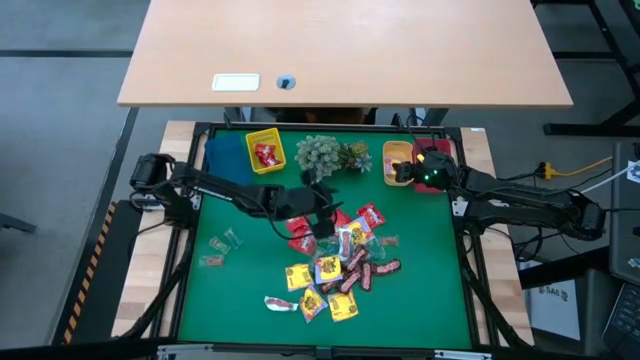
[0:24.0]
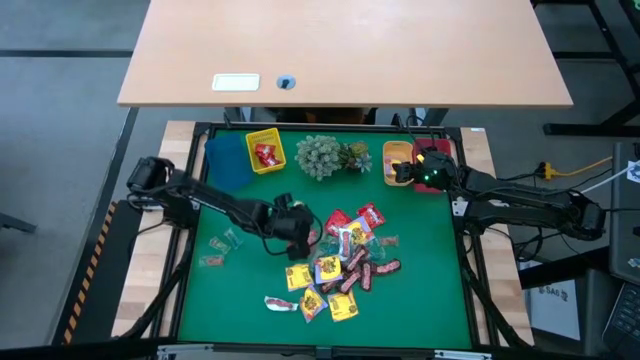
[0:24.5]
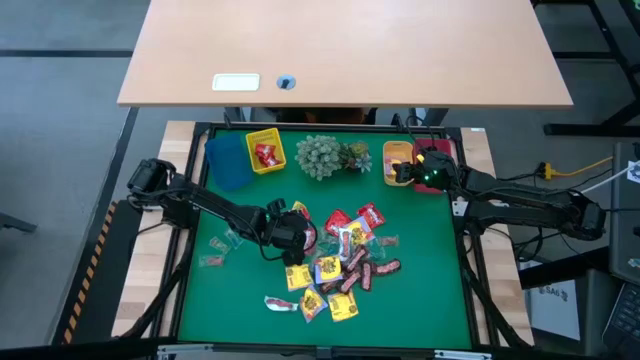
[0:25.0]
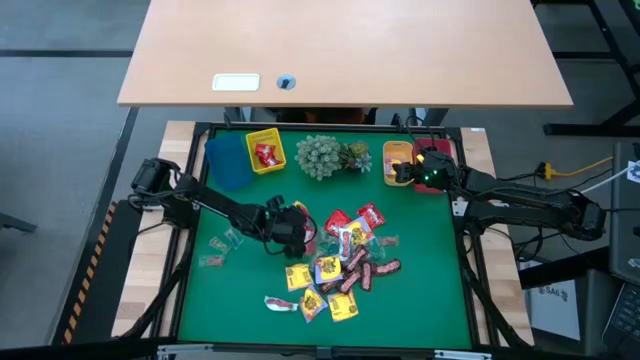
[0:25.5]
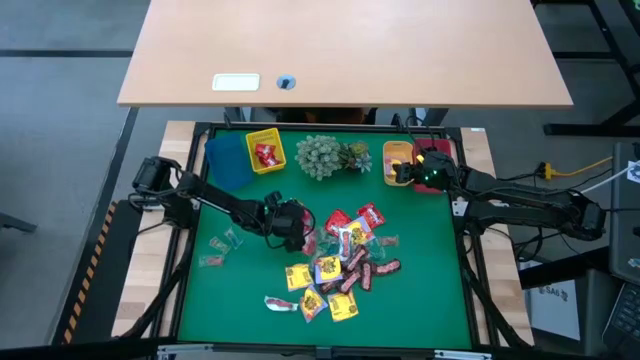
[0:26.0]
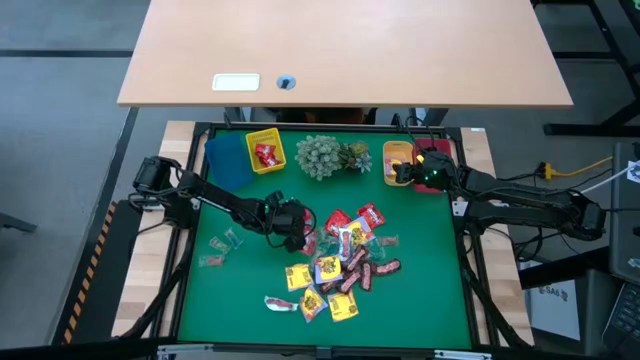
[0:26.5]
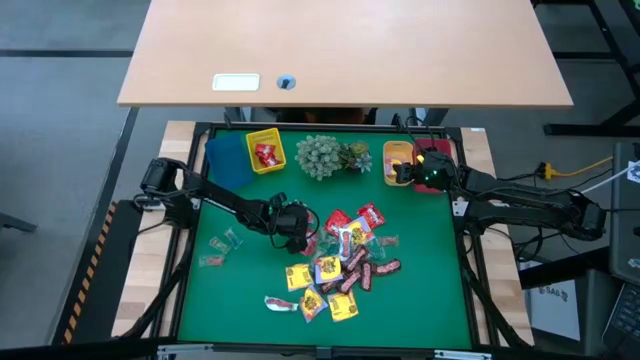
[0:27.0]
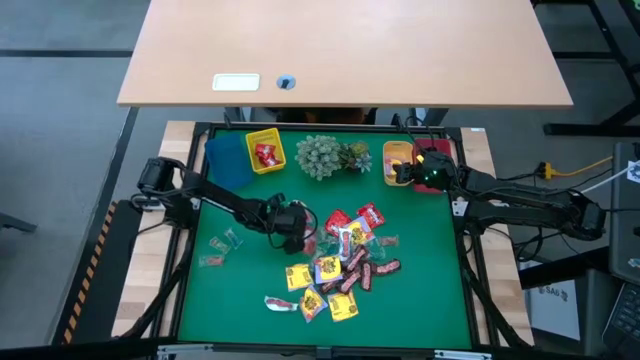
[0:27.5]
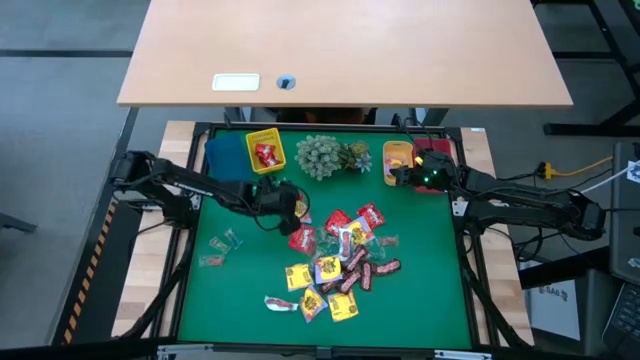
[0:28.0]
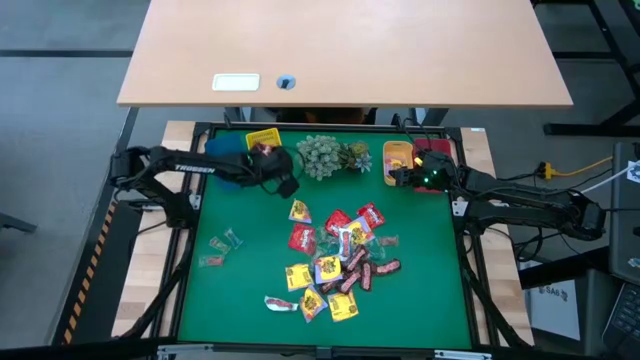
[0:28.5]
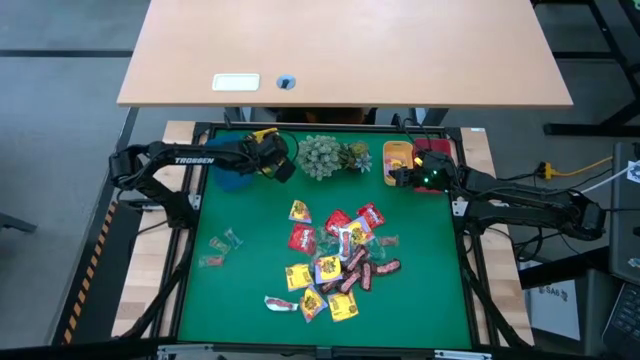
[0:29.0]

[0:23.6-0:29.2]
Task: Sort candy
Put the red candy into the yellow bin

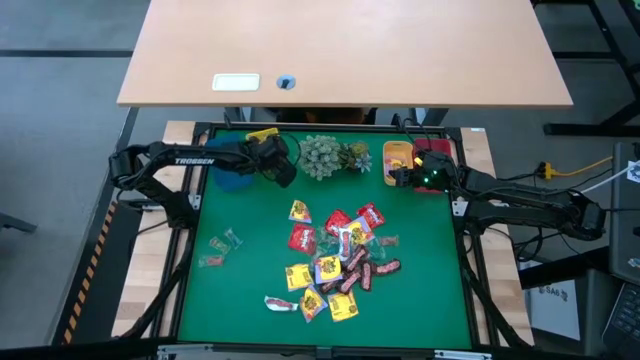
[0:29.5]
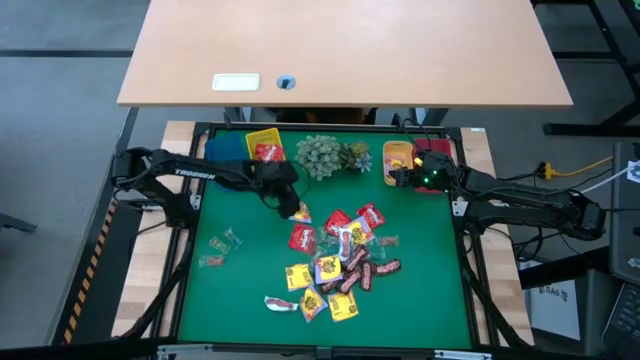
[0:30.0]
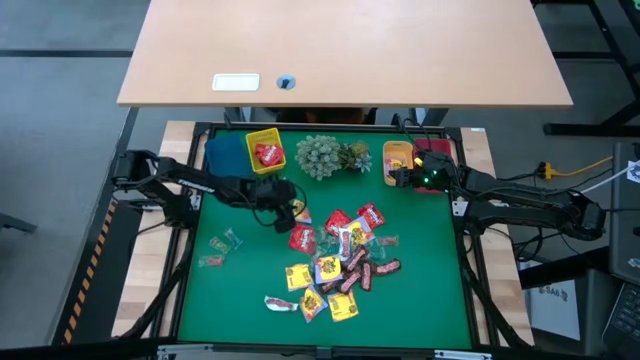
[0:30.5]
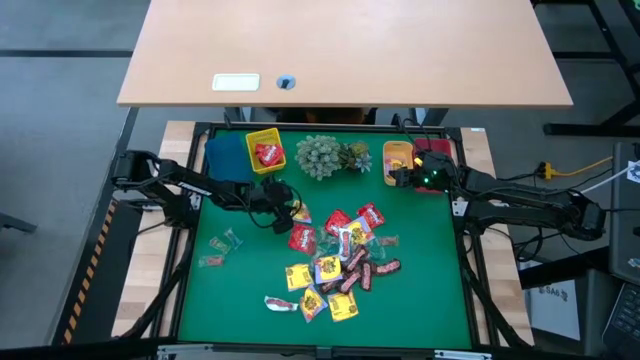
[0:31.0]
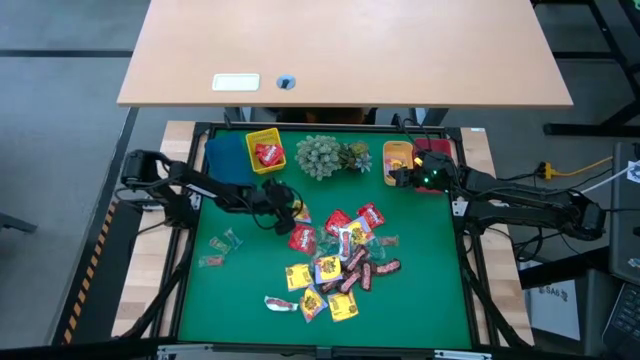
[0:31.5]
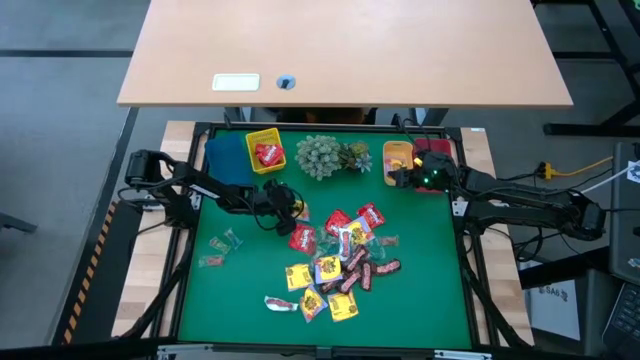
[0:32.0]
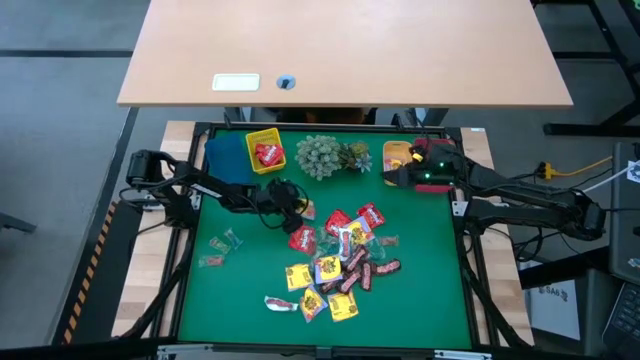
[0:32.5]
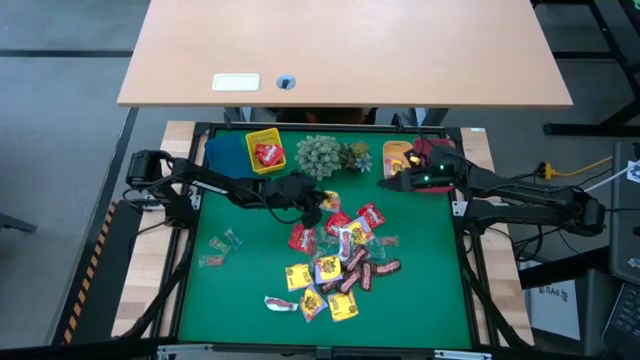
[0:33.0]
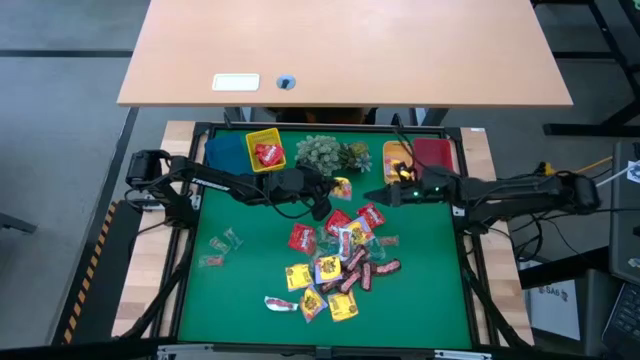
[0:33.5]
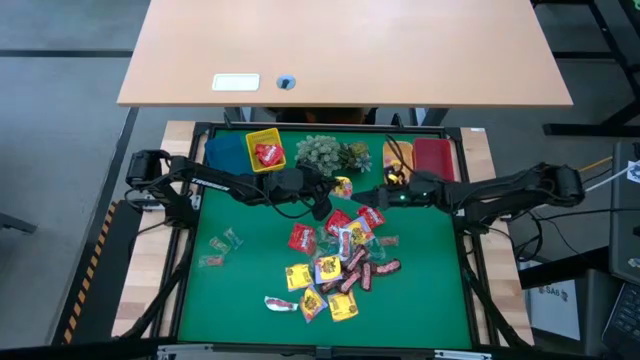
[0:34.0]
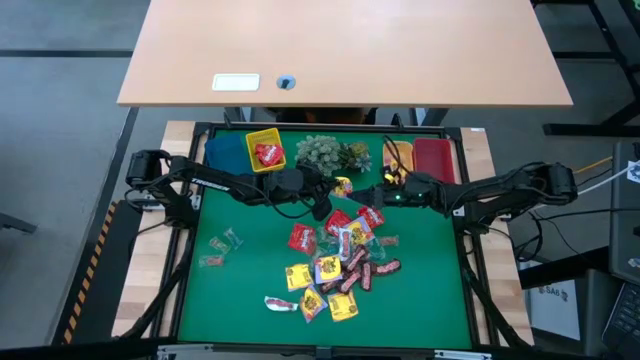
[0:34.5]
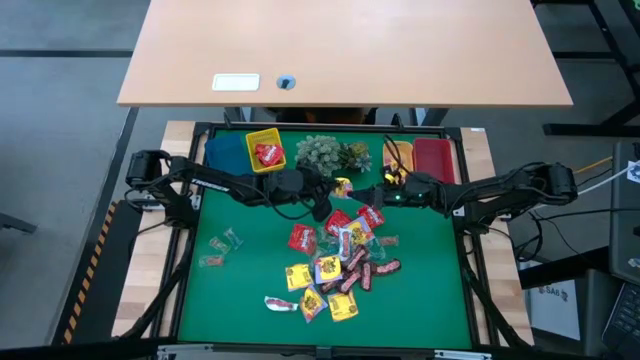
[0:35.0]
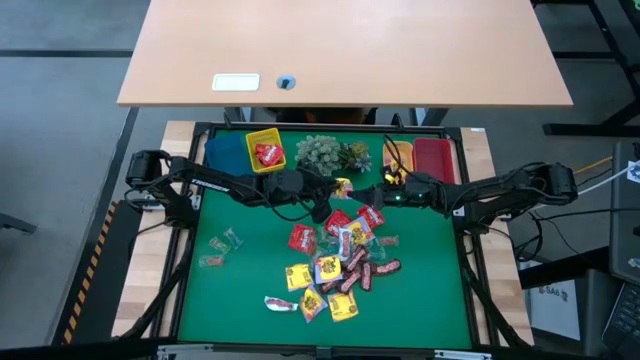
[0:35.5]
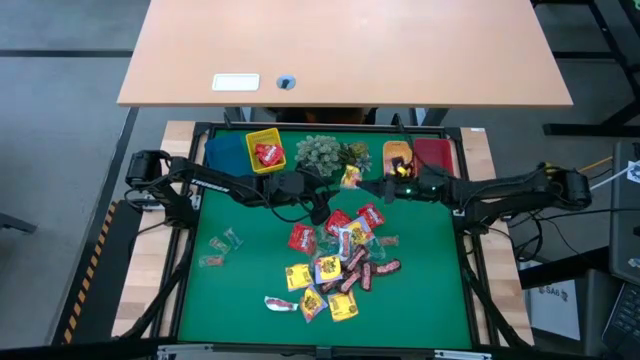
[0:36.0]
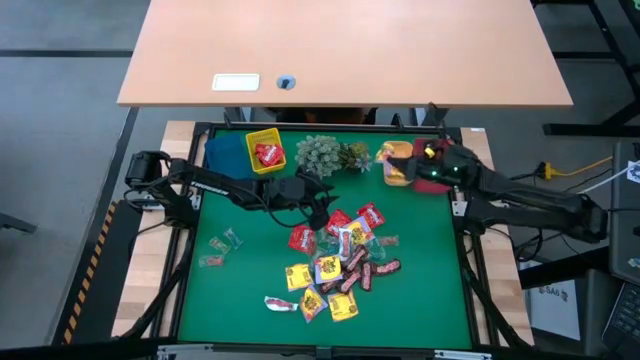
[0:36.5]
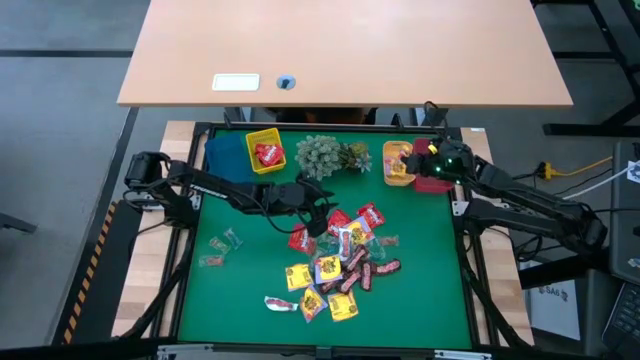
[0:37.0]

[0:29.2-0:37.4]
Put the yellow candy into the orange bin

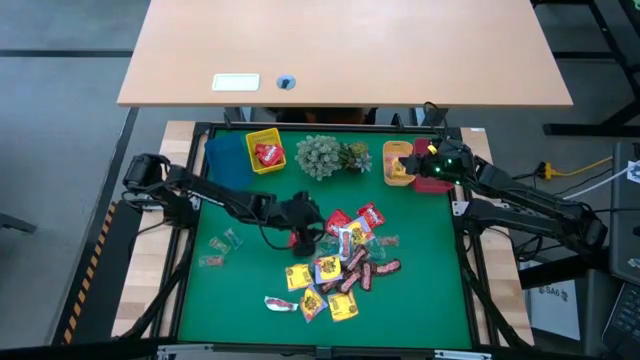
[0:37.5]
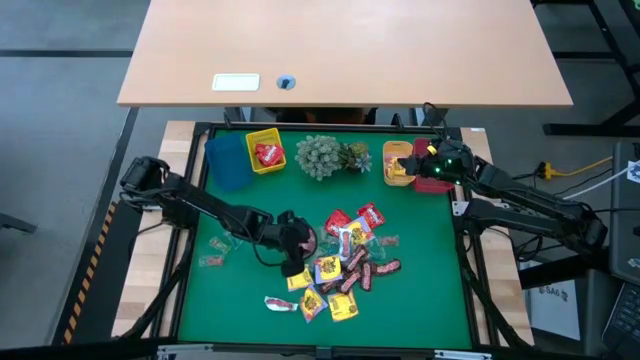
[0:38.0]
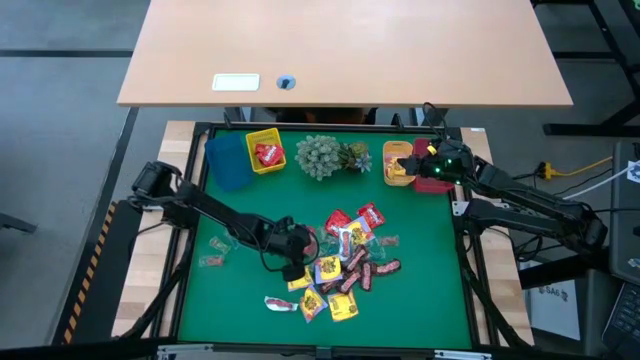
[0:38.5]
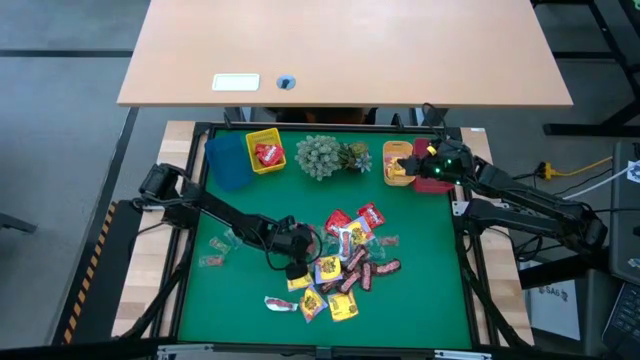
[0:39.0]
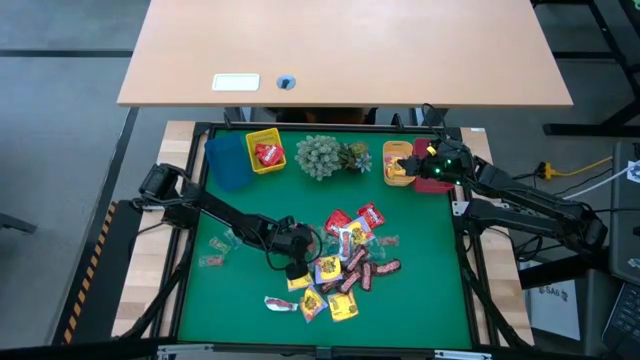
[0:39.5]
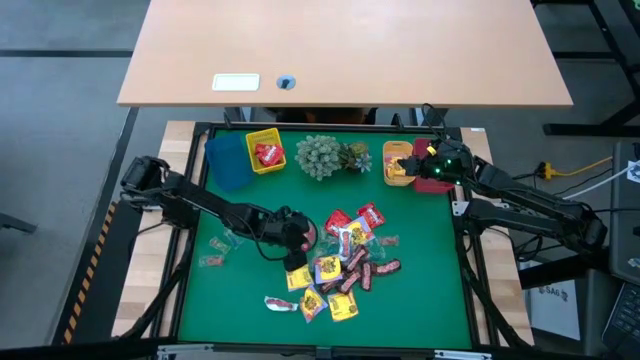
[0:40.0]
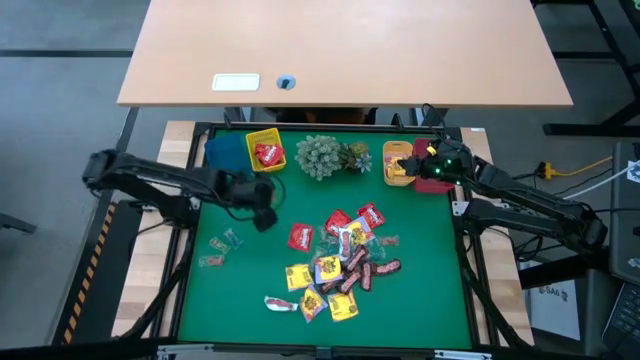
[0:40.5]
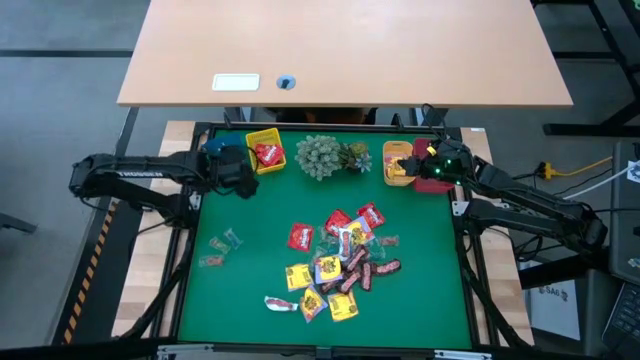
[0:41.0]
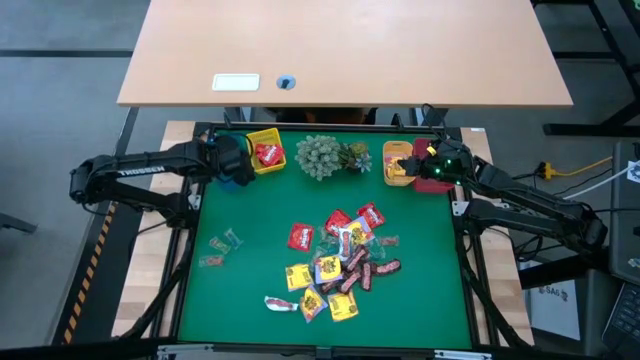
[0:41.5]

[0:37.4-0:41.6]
Put the red gummy into the blue bin

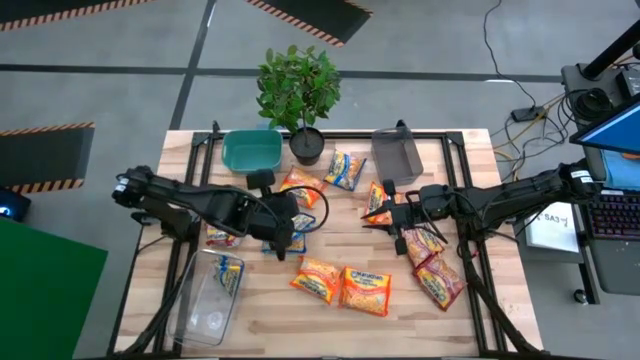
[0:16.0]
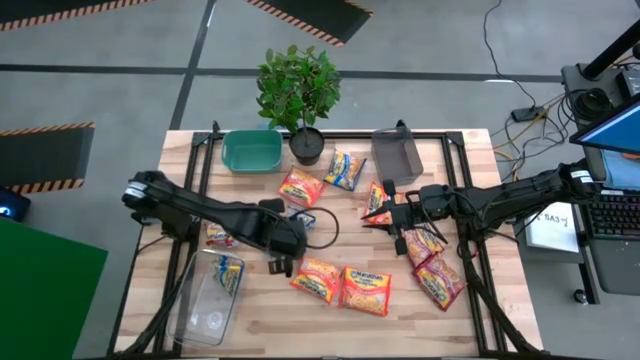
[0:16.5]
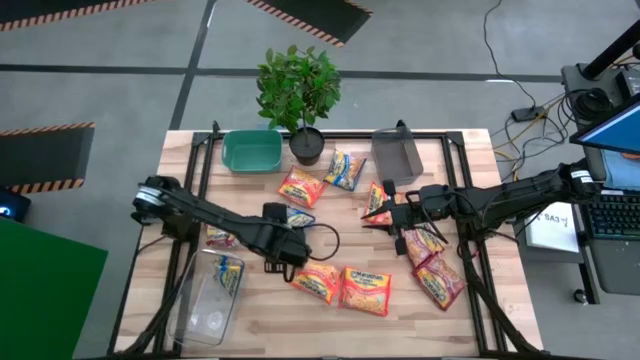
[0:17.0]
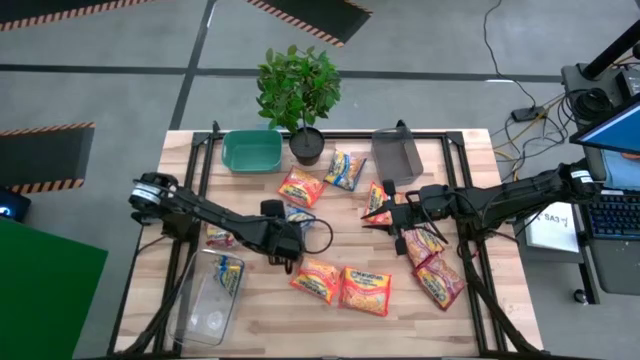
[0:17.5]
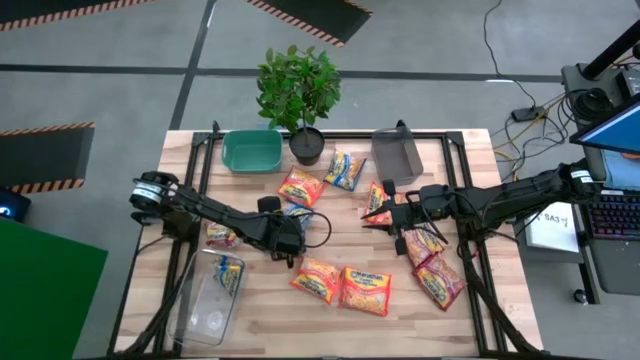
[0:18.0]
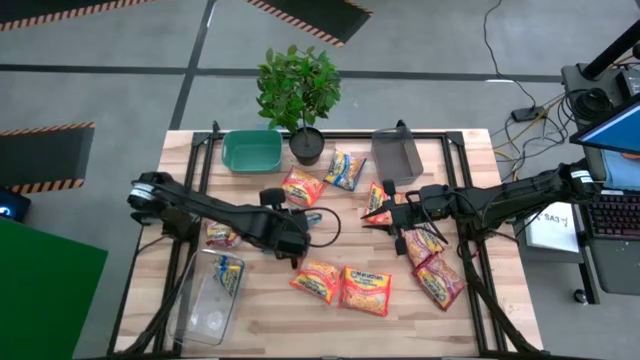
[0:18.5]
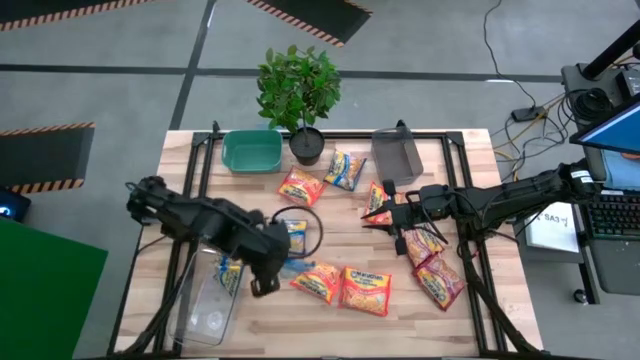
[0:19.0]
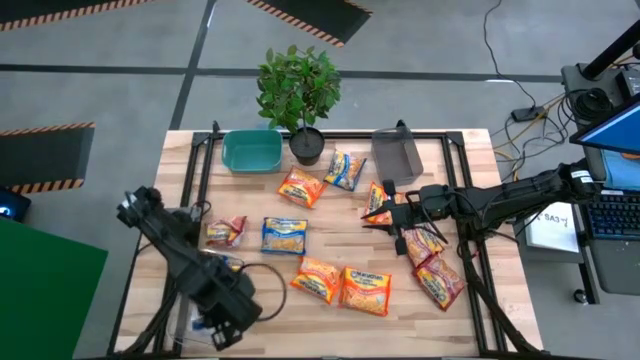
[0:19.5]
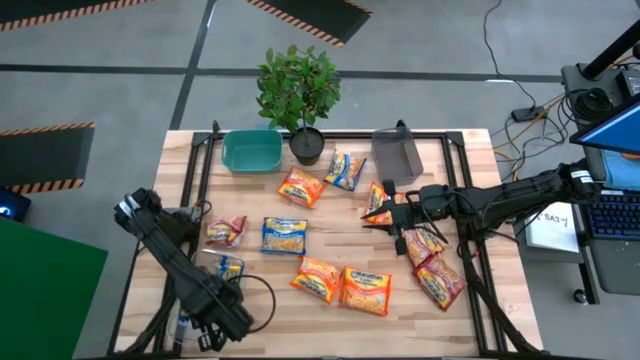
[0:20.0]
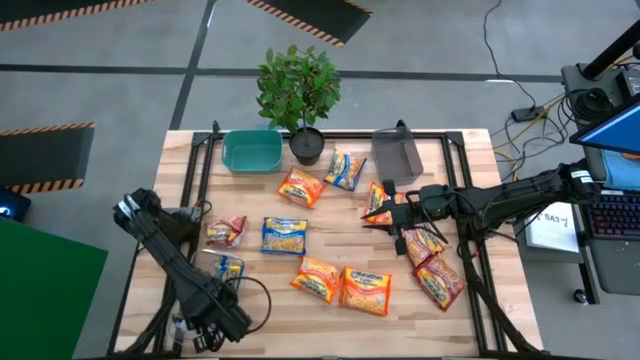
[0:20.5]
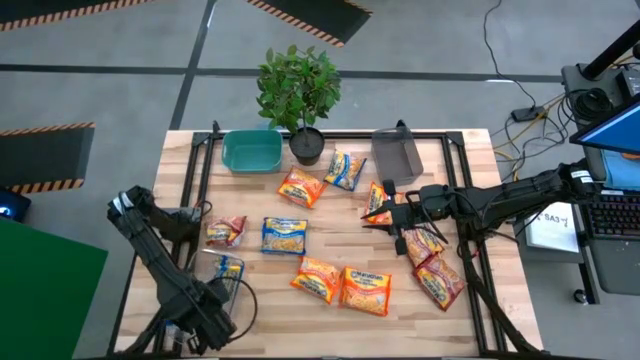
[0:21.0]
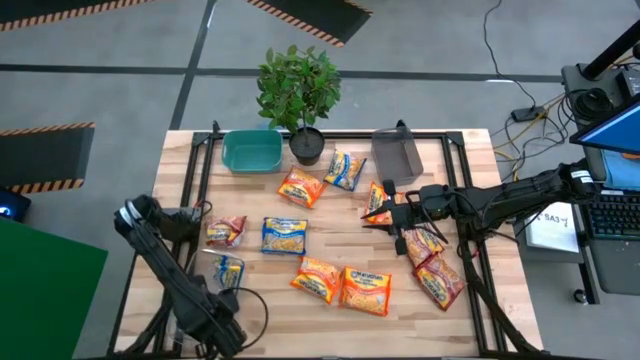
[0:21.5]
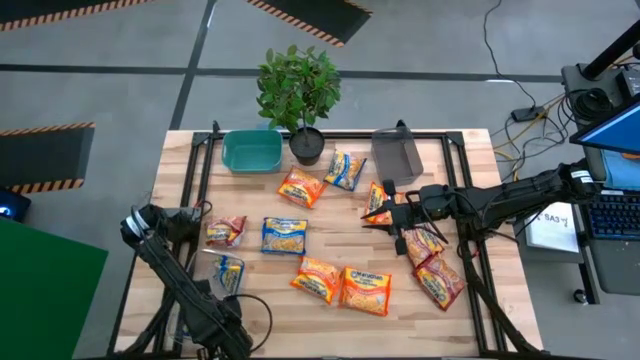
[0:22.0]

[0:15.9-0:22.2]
Task: Sort Maruchan noodles
Put the blue noodle pack into the transparent bin
